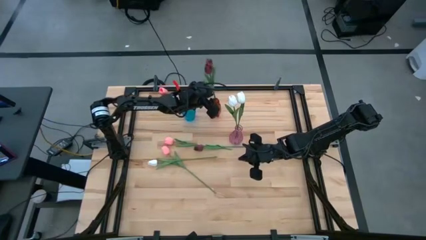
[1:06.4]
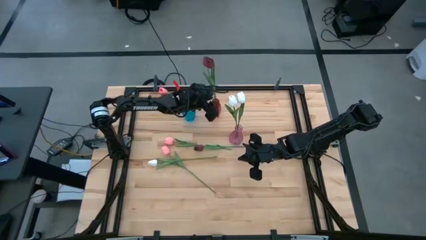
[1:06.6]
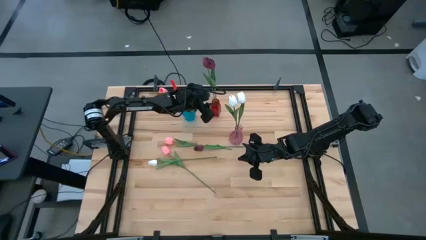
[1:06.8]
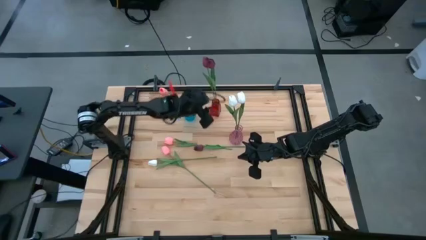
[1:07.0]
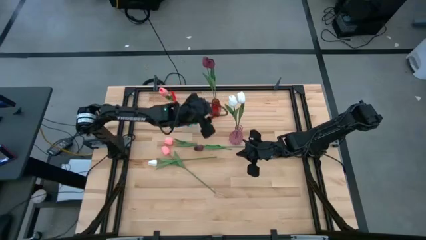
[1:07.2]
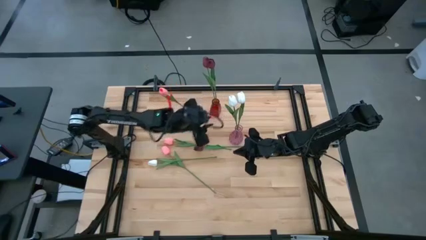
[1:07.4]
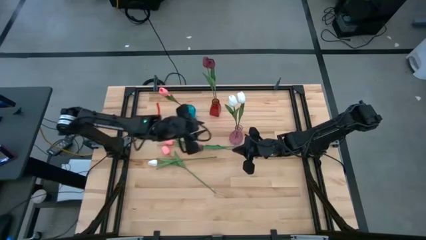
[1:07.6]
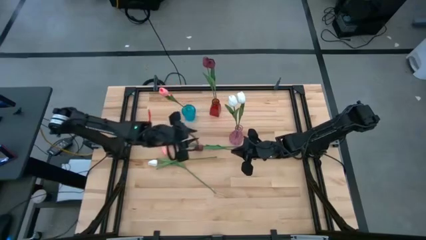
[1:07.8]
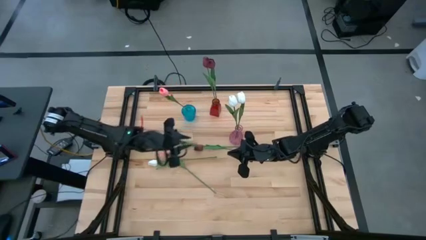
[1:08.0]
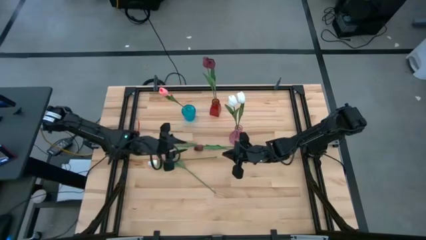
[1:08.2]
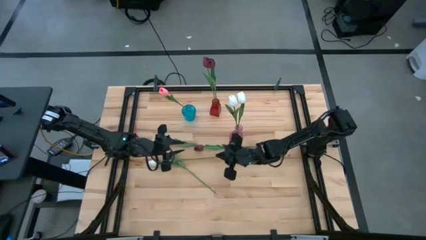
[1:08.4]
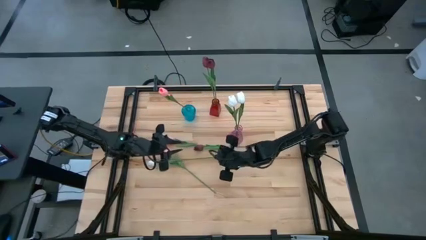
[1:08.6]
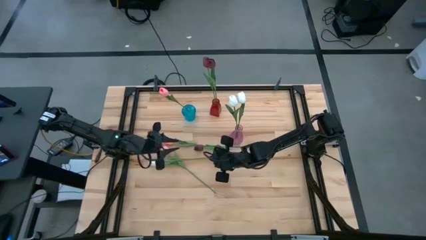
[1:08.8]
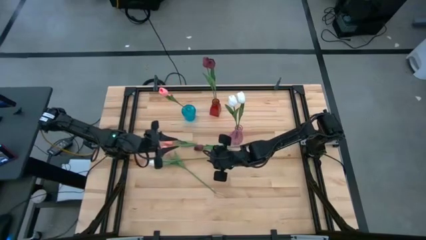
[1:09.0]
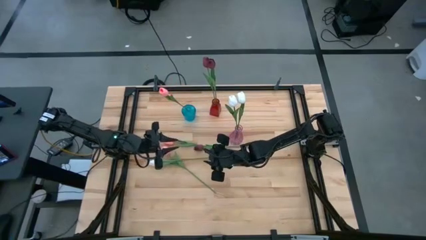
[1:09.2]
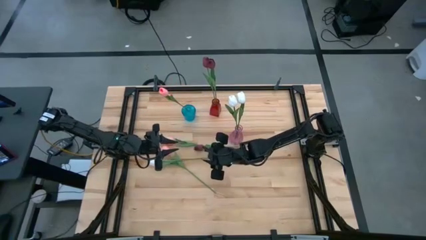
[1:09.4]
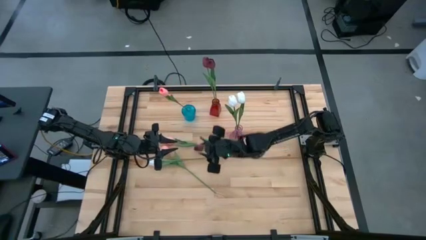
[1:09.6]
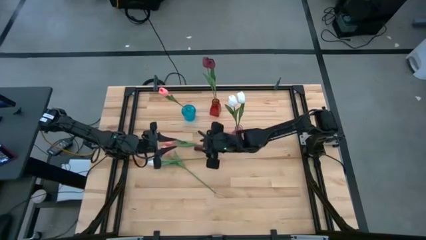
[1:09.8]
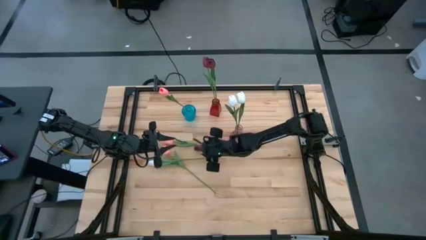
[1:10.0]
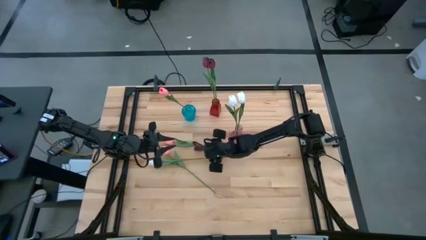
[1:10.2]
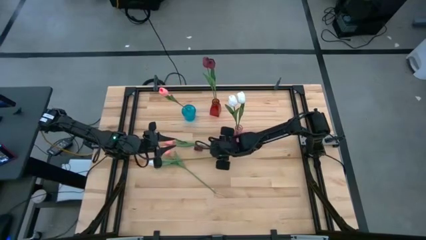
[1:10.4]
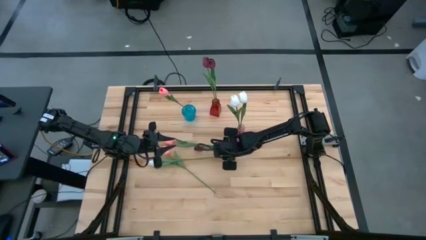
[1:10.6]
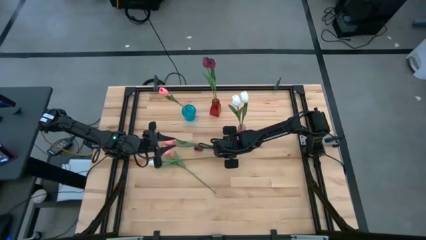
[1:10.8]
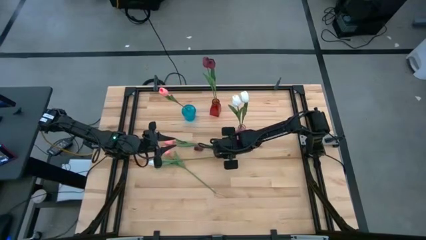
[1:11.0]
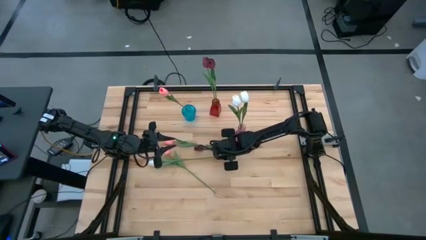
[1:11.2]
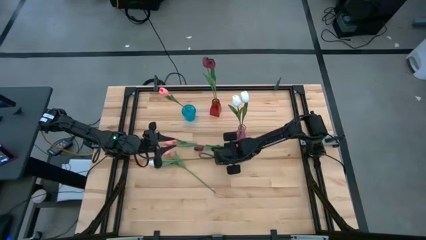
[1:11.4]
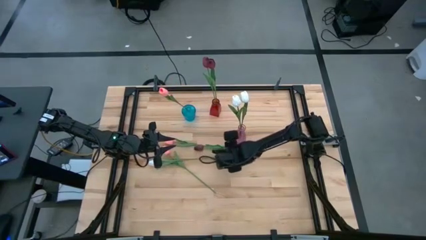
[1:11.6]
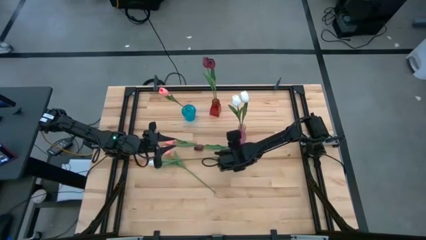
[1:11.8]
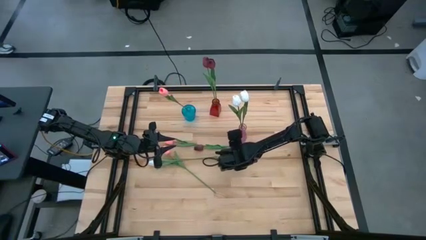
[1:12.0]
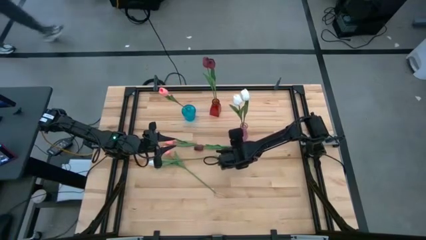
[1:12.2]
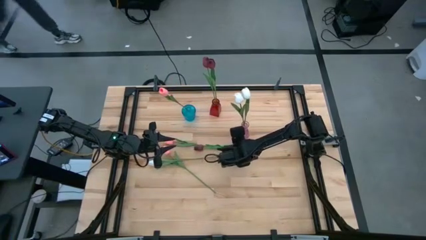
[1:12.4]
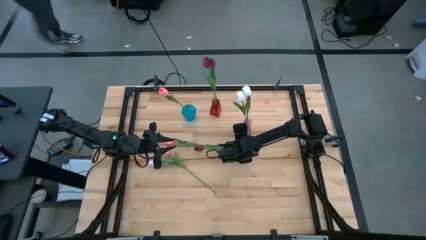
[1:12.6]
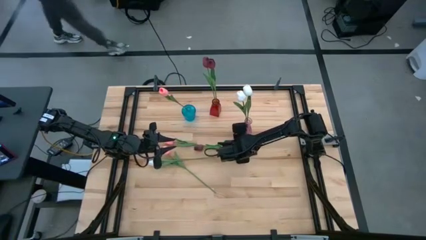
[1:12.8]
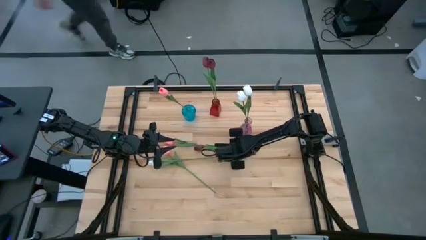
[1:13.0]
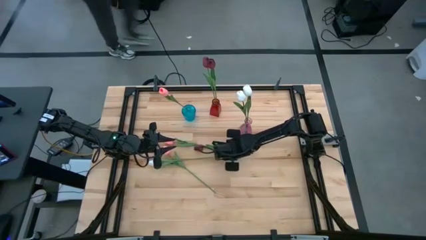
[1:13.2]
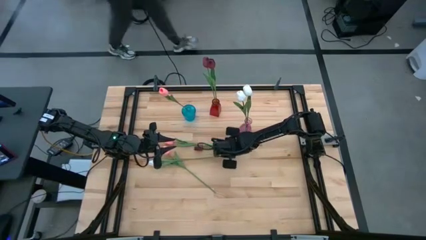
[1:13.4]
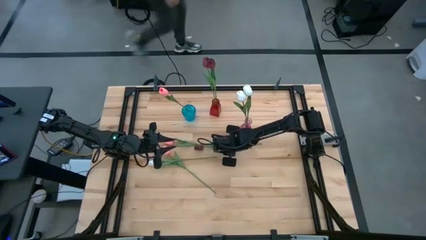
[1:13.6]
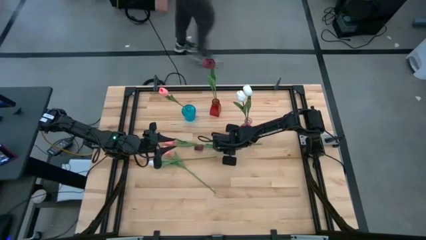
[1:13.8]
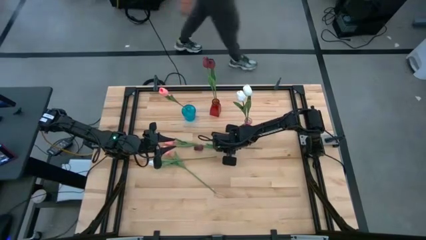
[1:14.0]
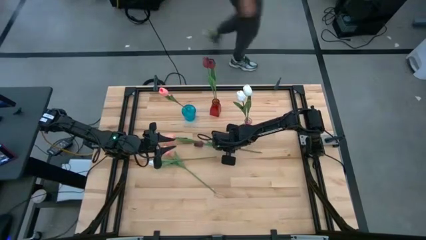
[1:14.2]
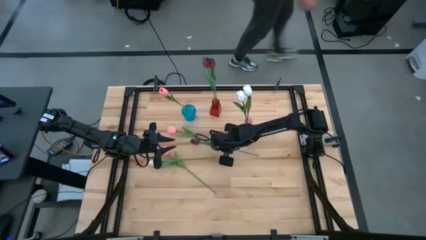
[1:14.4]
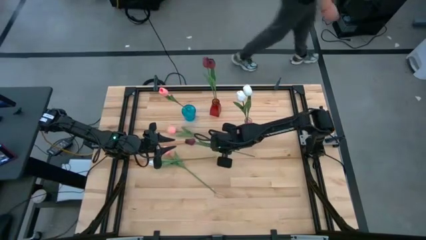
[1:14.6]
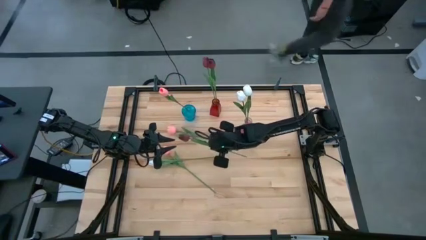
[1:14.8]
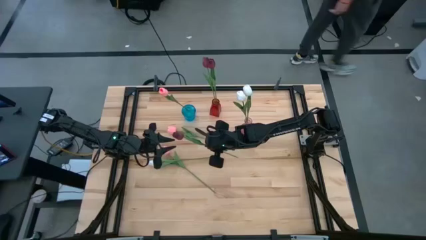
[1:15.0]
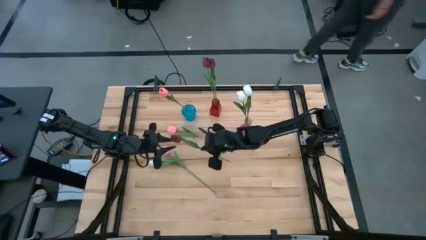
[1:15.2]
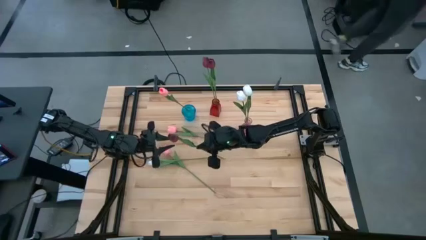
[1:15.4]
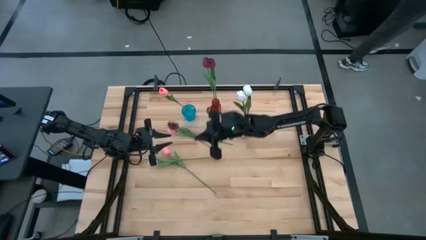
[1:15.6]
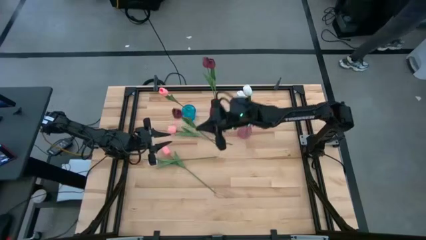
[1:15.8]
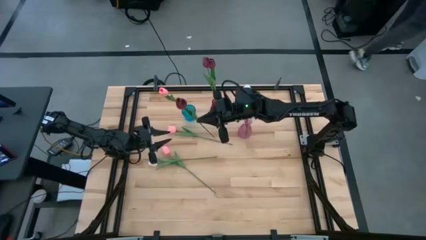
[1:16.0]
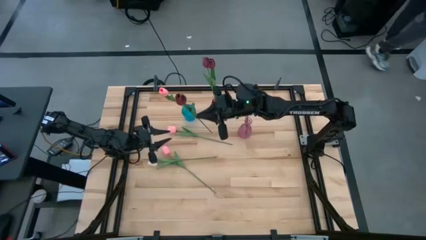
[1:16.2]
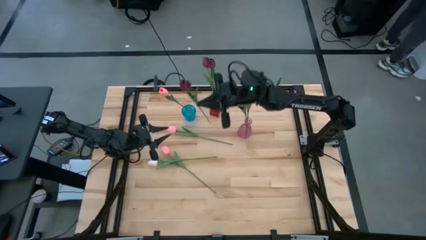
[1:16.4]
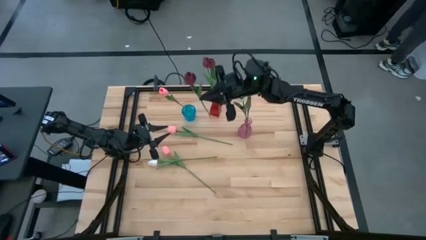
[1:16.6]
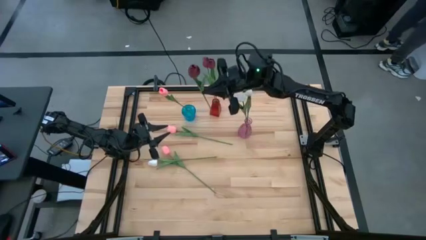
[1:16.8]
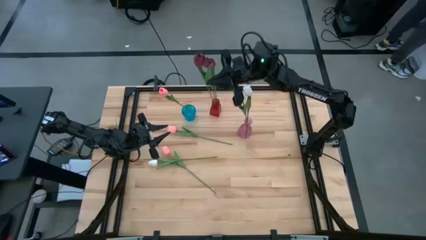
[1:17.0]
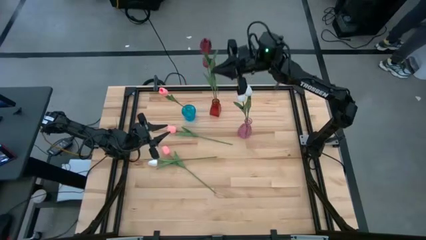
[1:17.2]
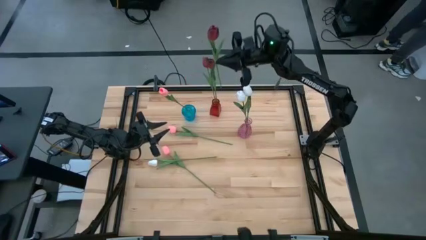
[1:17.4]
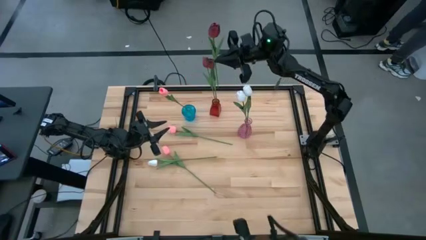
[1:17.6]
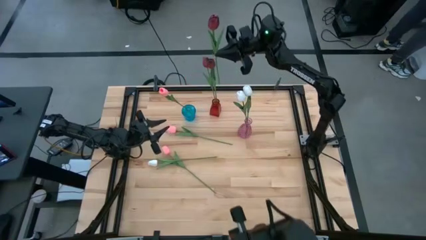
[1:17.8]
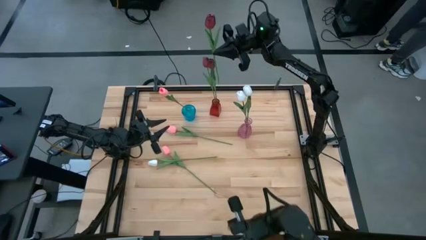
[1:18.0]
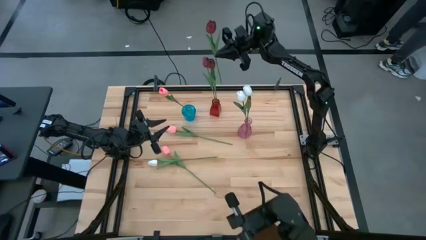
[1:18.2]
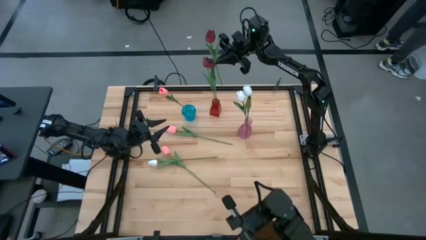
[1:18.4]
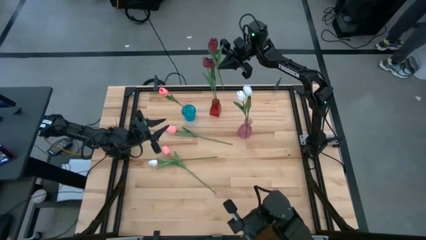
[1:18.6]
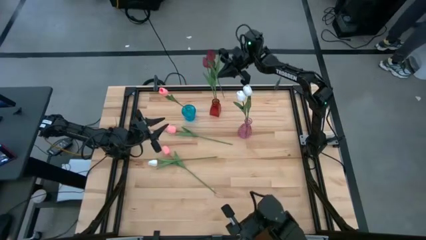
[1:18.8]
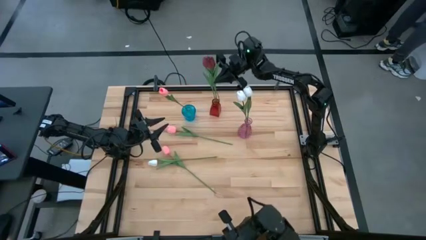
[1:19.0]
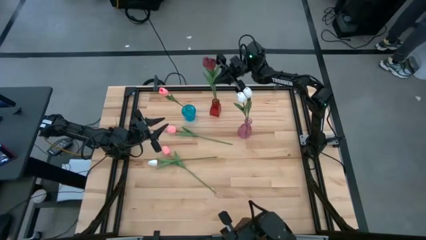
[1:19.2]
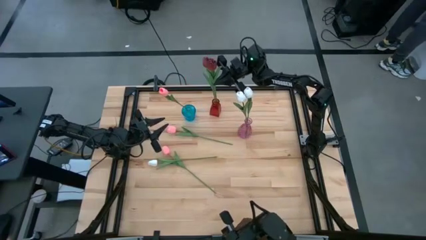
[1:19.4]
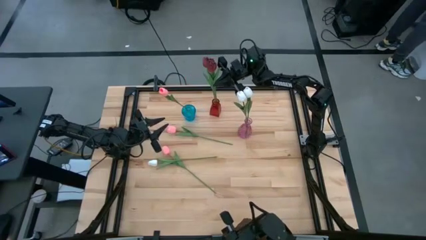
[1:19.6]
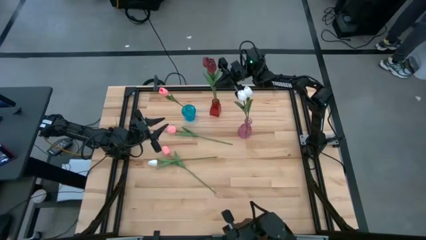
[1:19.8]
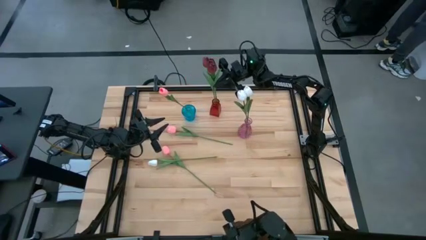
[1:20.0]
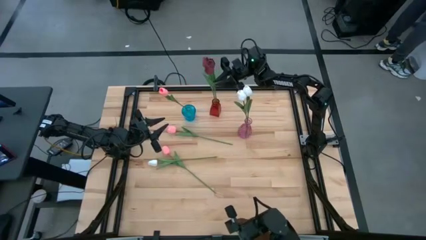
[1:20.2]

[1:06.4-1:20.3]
Task: Sort flowers into vase by color
Put the red flower into the red vase
